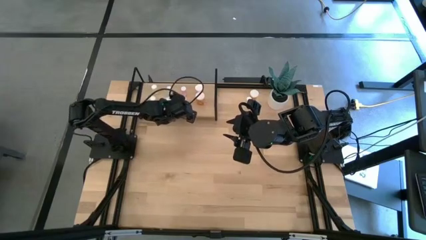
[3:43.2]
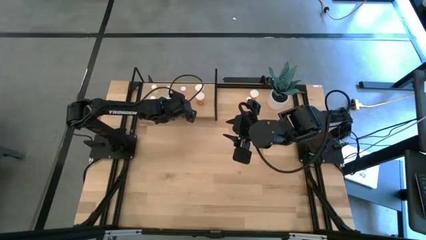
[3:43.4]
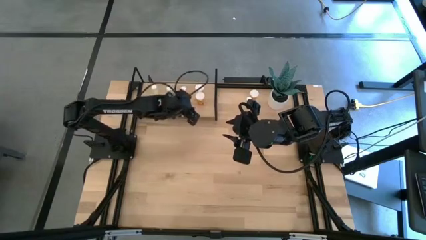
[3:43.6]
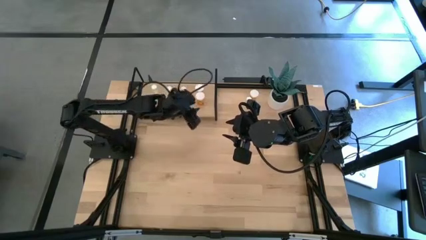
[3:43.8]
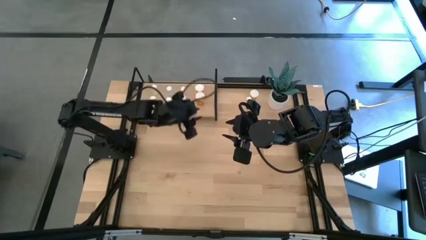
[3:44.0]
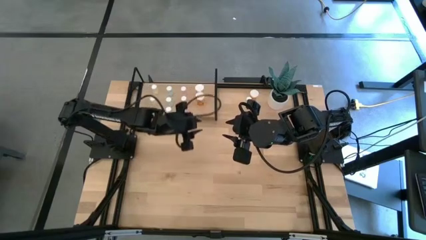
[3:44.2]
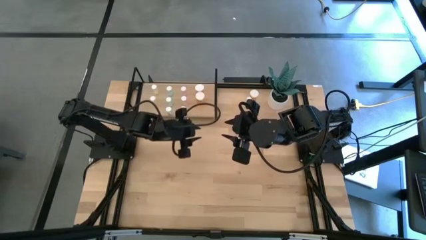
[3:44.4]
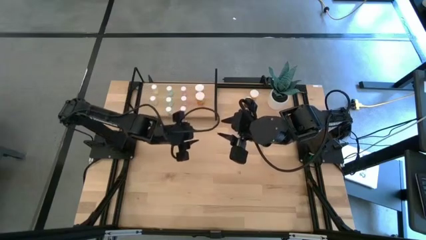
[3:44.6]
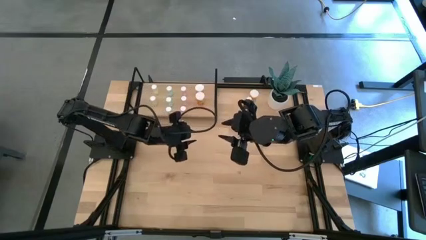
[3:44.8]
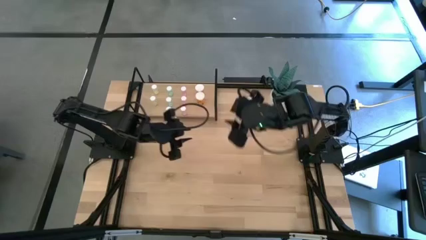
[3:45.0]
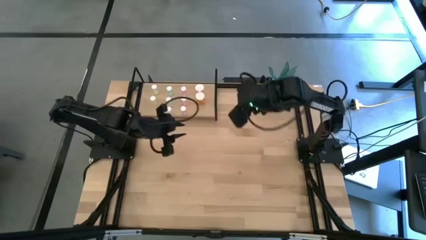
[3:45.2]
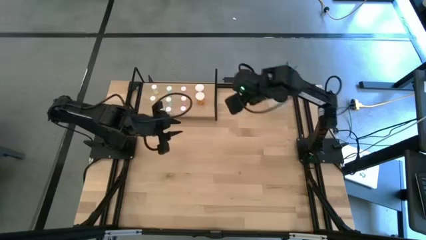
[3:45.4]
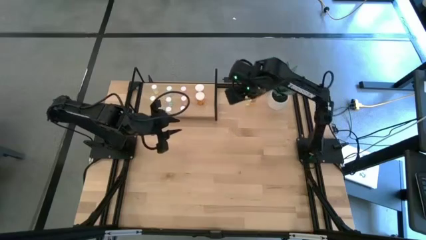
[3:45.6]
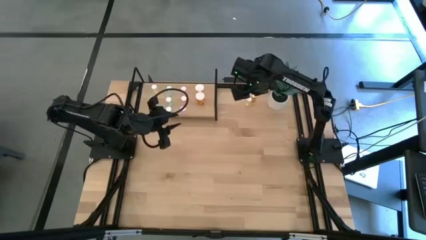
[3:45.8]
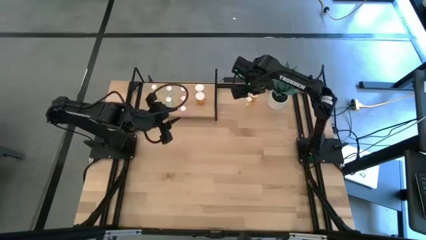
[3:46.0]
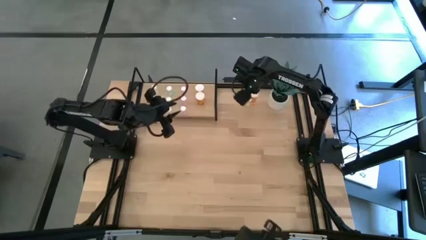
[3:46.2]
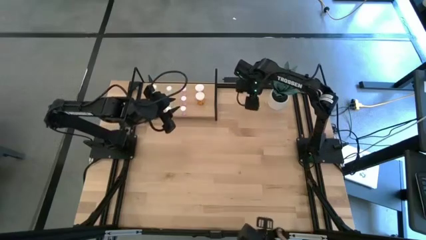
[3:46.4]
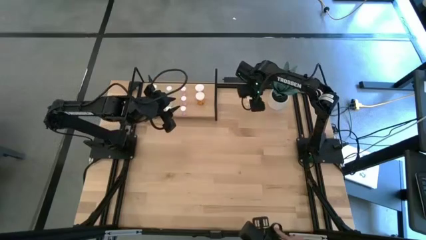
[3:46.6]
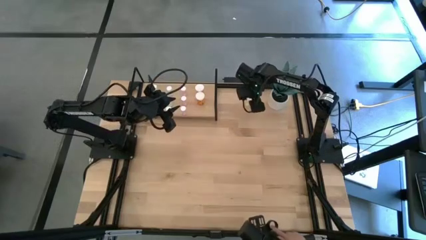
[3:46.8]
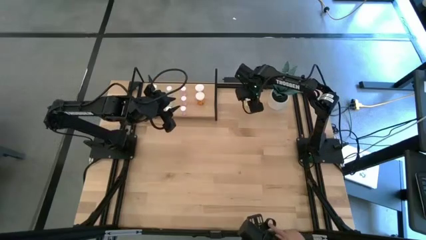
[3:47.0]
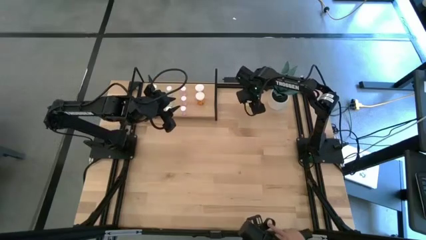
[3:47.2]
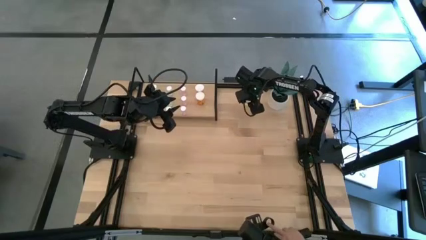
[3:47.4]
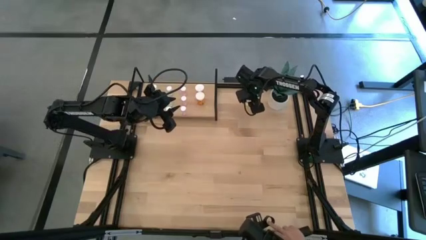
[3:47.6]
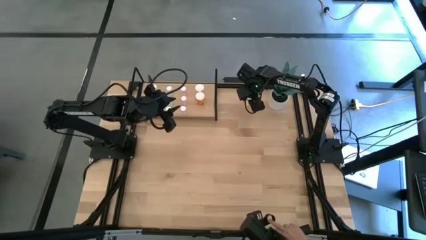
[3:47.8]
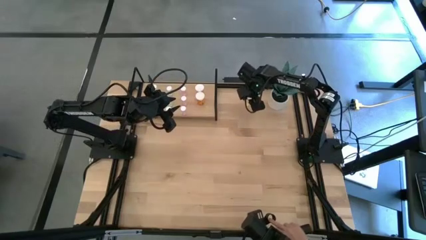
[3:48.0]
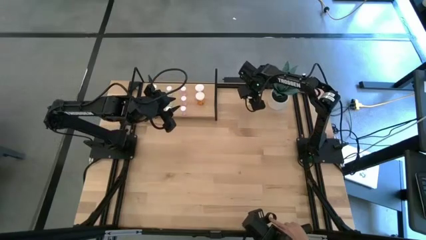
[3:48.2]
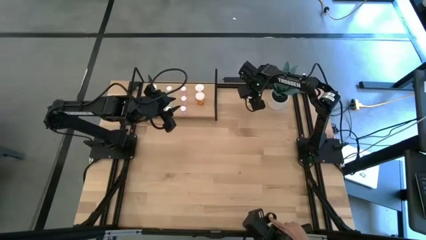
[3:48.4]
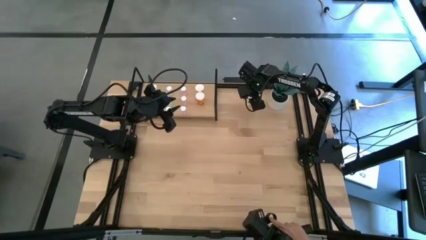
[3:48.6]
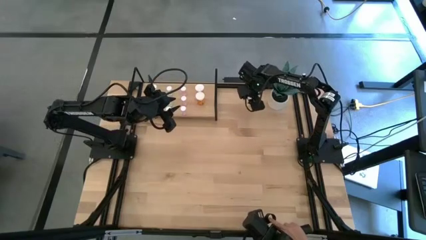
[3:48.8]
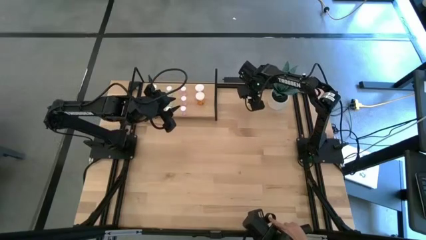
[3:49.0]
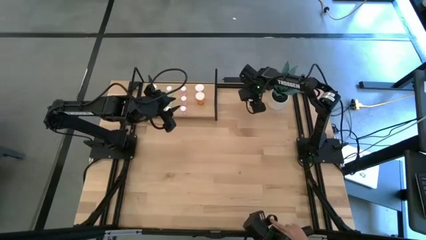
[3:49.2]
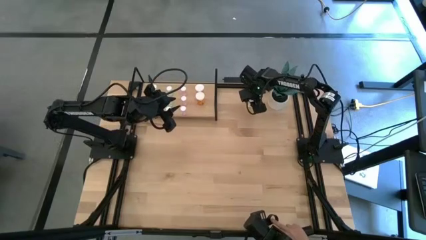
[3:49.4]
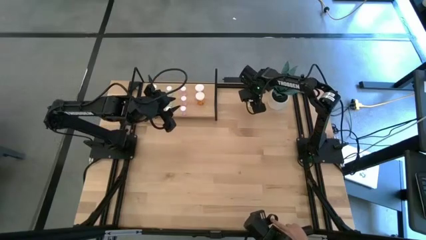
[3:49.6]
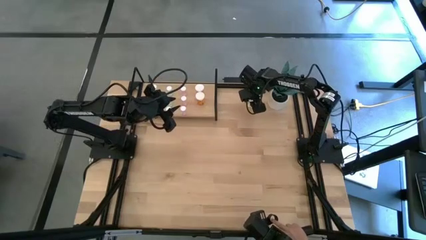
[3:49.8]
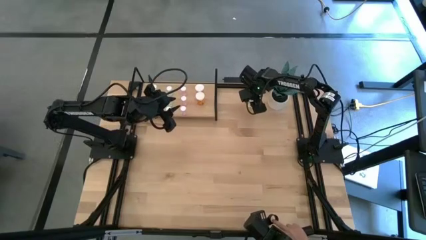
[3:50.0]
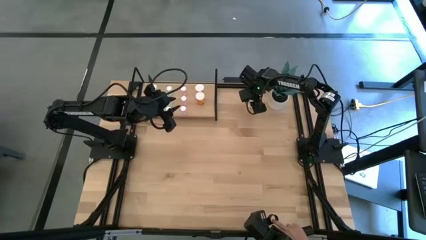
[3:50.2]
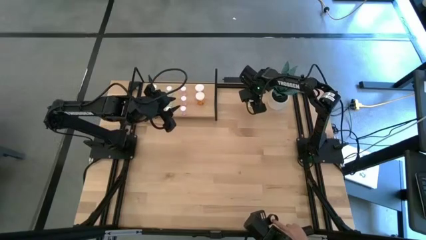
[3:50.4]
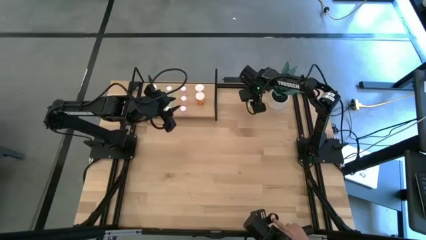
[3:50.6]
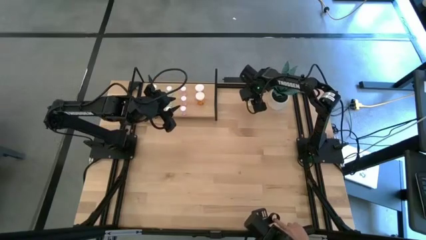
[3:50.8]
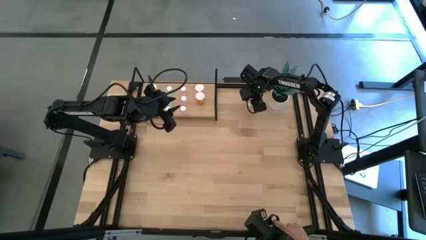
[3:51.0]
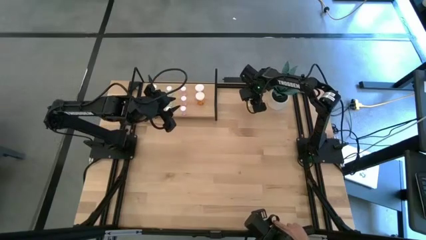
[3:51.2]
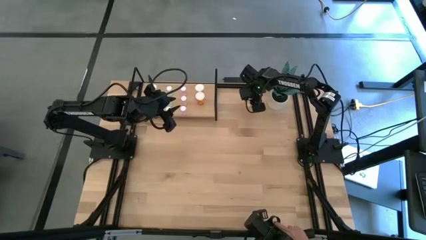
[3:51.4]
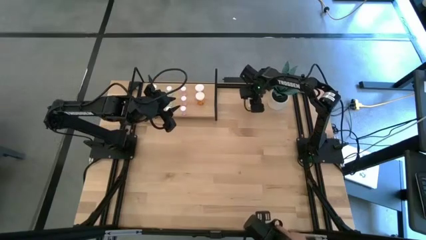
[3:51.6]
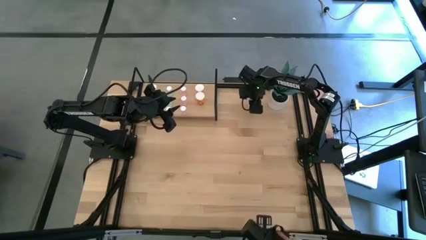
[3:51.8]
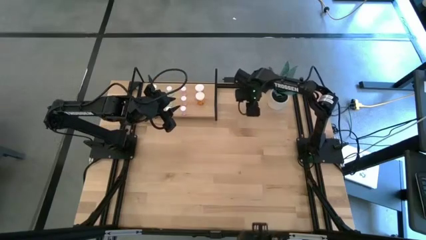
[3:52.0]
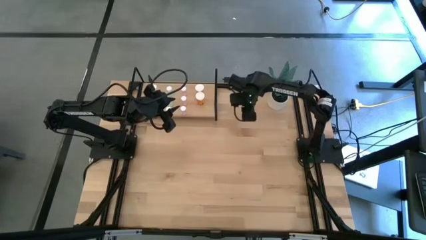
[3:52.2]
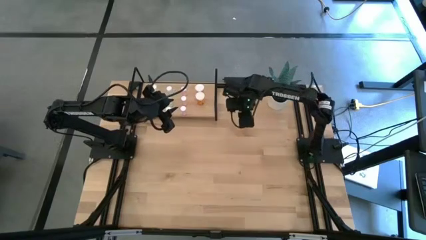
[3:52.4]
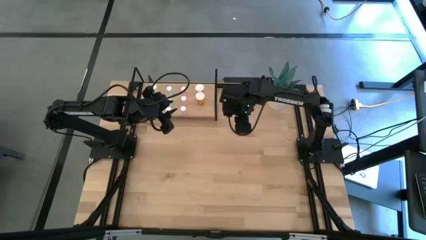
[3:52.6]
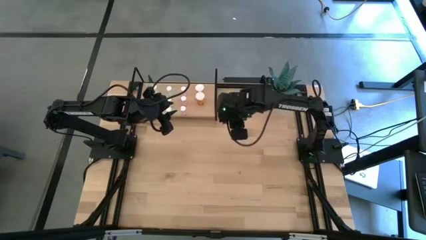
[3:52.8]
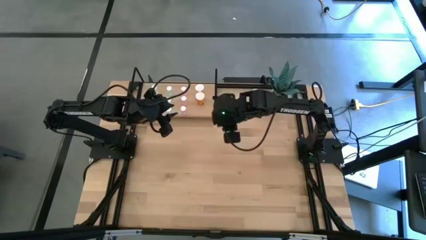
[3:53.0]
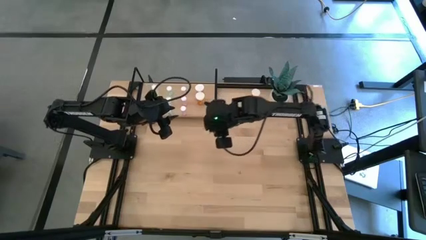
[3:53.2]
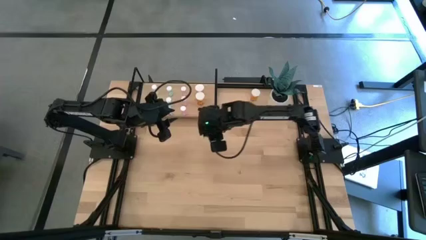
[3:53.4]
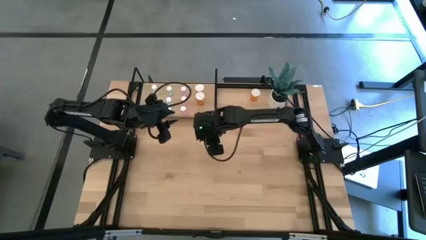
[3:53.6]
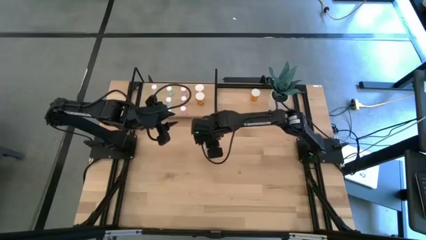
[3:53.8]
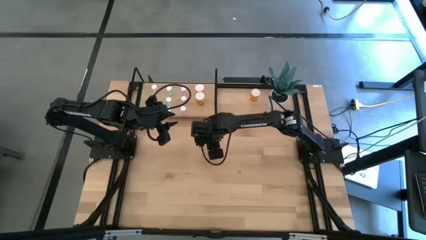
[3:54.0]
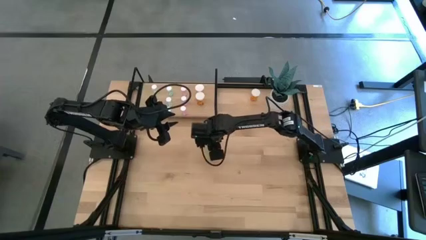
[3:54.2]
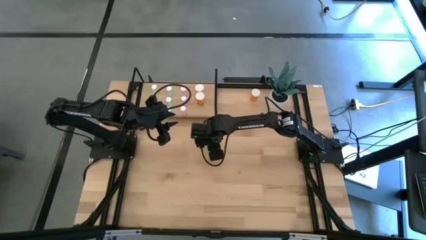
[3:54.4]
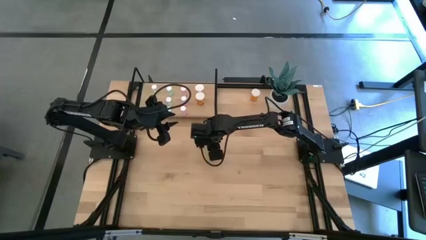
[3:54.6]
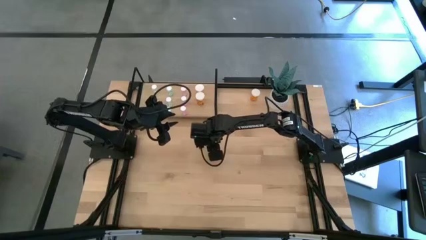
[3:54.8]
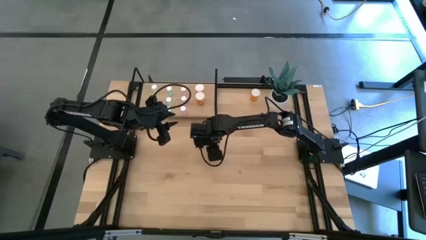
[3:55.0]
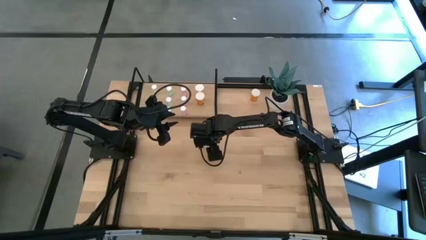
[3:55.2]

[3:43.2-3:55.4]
Task: Pick and place medicine bottles onto shelf by color
Put the yellow pill bottle on the shelf and align it with the other yellow pill bottles

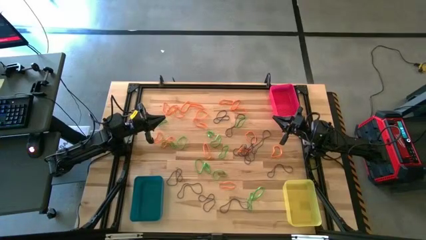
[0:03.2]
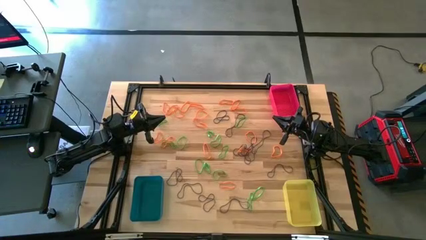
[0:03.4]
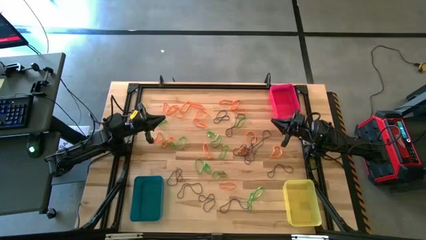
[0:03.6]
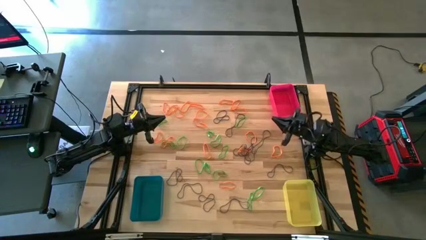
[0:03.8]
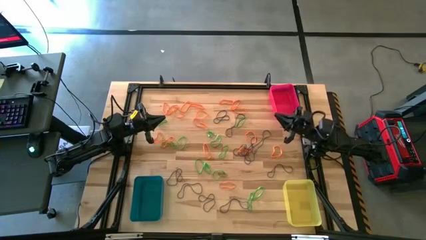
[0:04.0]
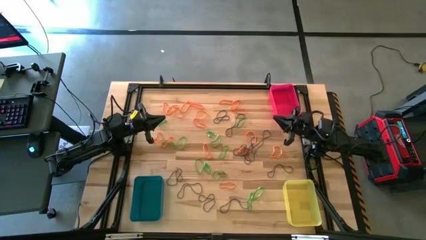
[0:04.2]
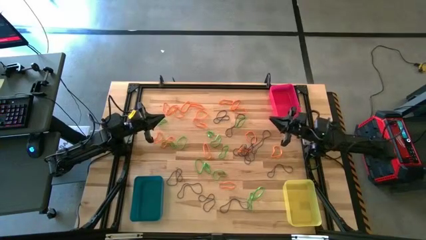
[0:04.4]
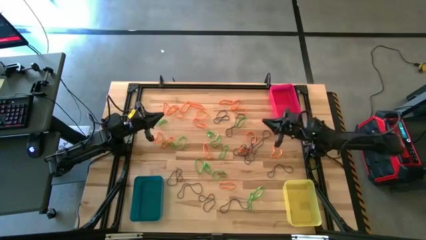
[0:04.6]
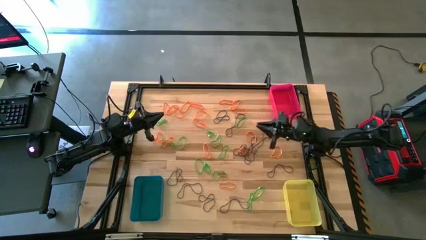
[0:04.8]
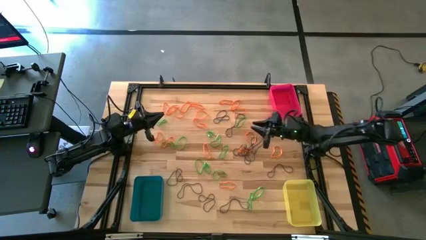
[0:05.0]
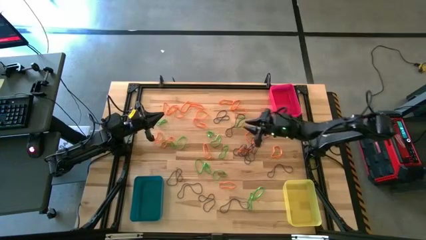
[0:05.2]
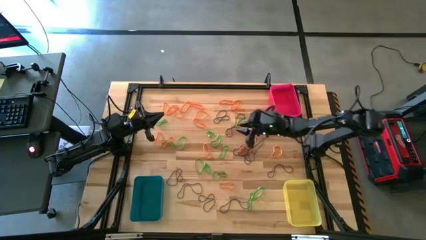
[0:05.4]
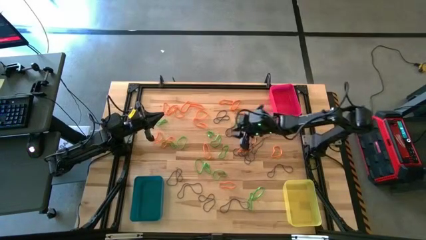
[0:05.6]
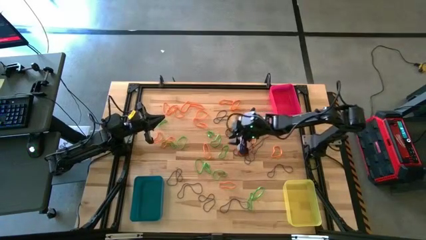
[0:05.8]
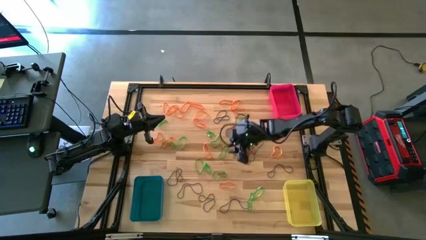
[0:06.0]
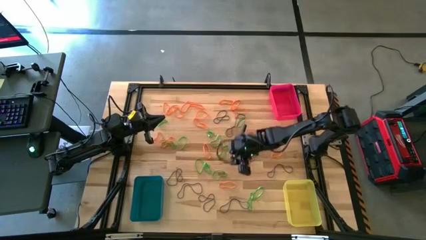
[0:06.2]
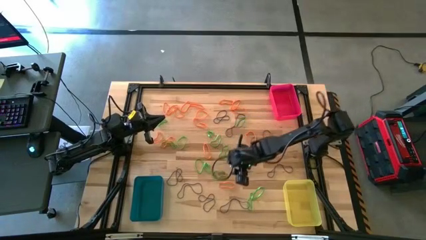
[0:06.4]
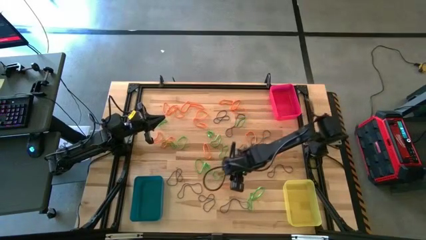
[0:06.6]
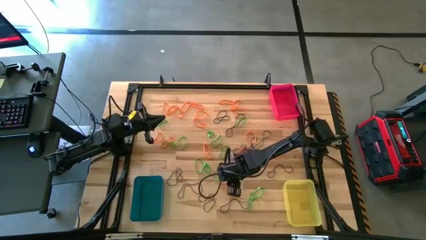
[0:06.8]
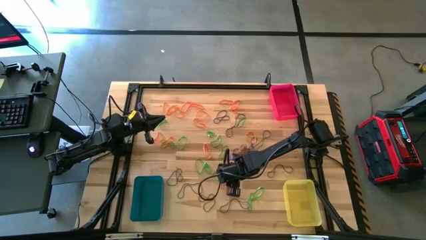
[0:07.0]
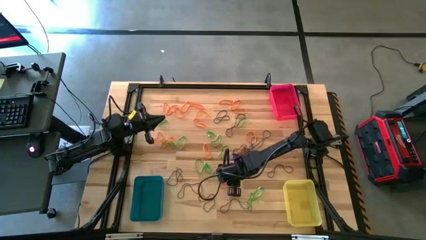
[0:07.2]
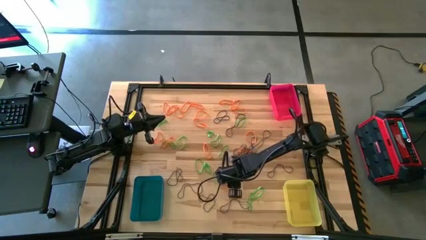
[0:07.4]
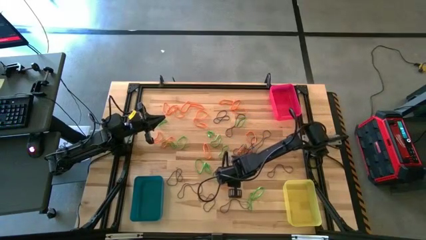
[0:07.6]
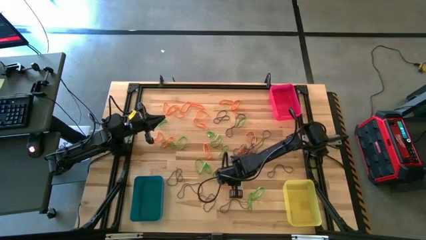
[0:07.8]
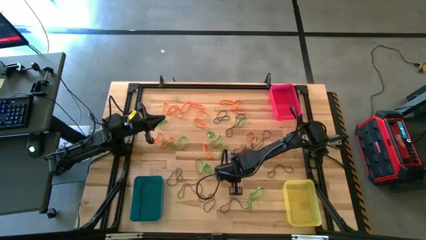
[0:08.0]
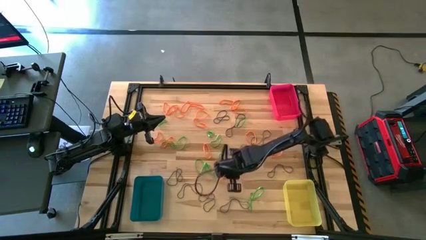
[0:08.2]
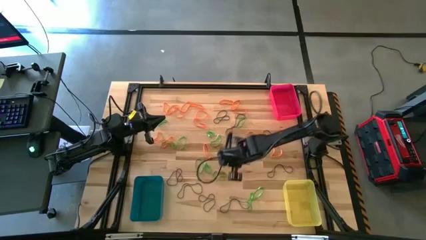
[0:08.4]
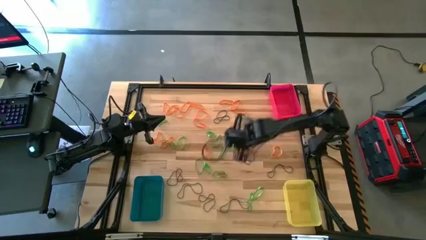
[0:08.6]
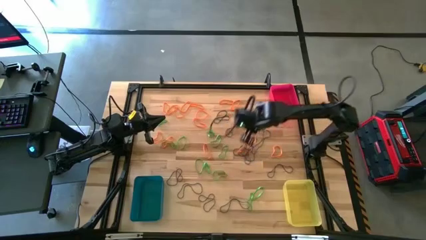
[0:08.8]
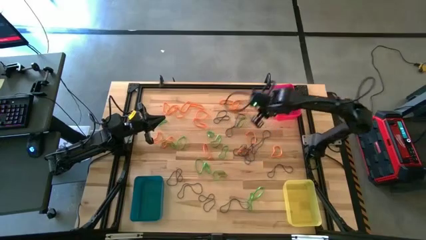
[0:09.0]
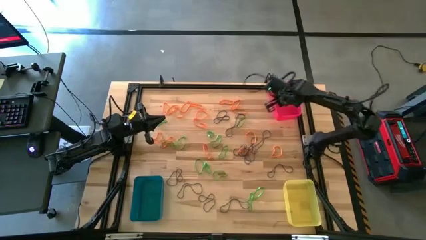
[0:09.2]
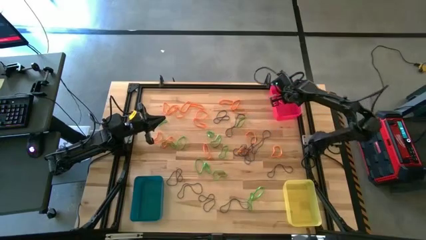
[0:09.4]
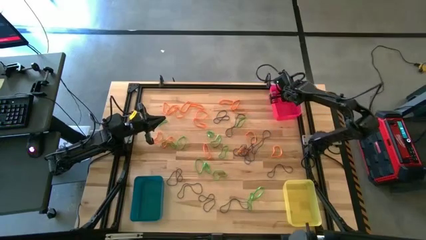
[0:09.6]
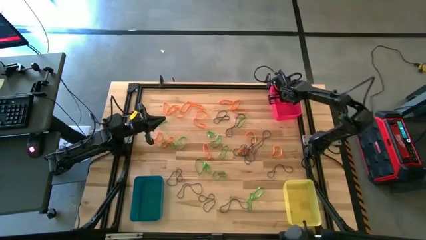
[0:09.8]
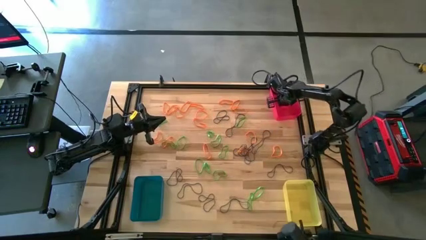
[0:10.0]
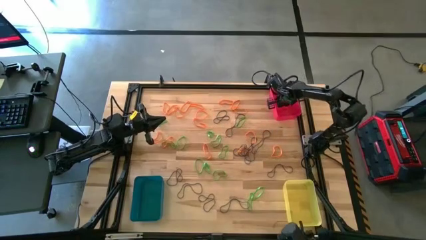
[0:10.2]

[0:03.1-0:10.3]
Task: Sort rubber bands into baskets
Put the orange rubber band into the red bin
